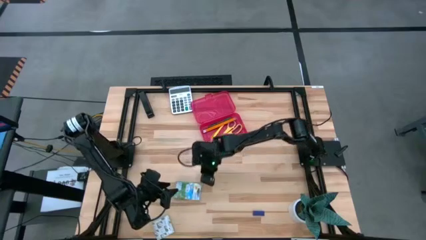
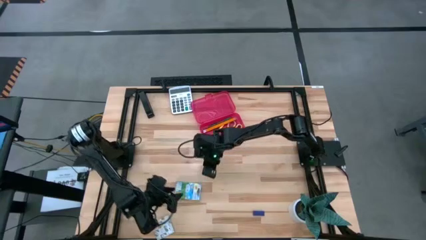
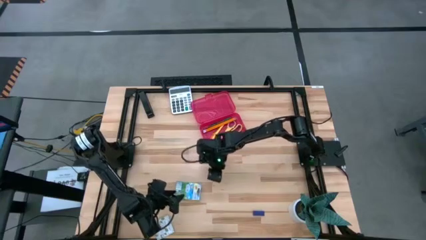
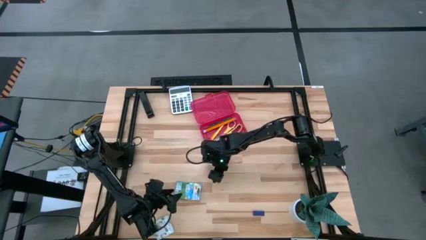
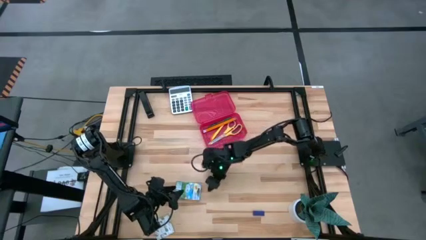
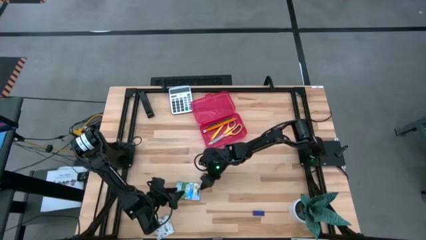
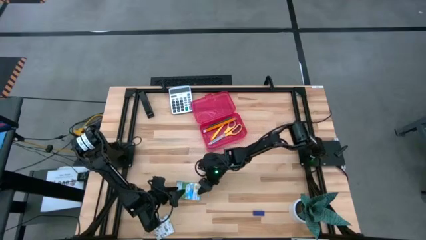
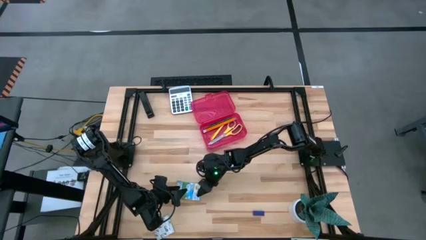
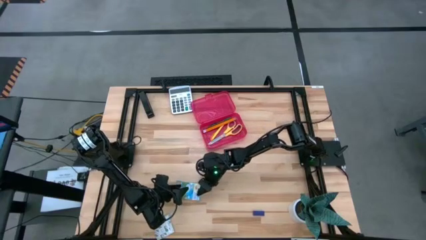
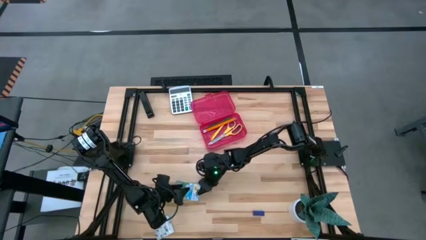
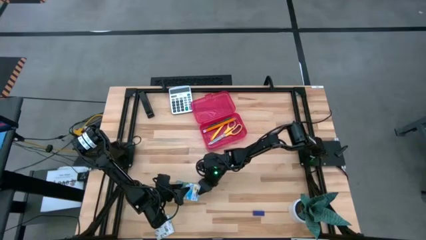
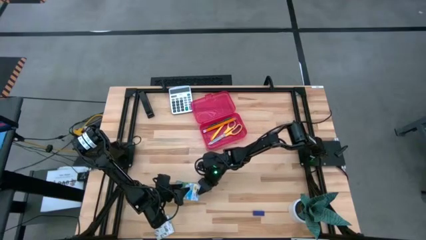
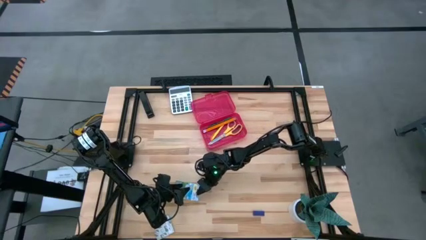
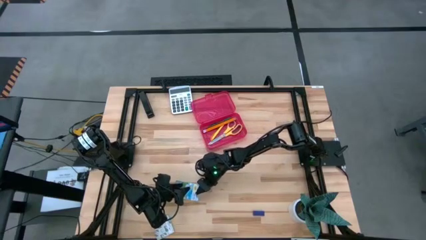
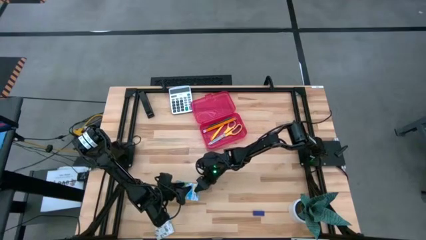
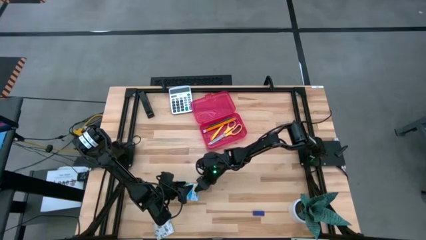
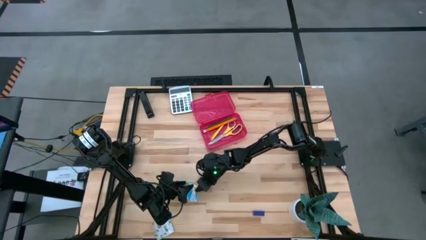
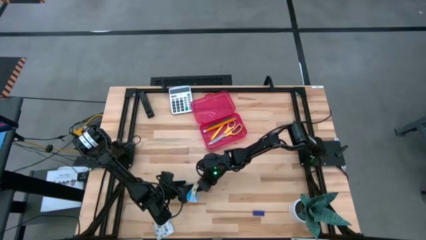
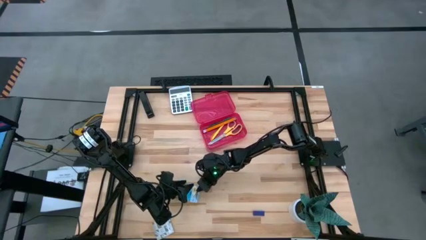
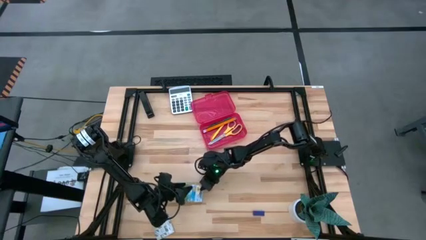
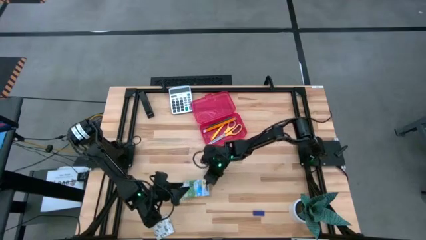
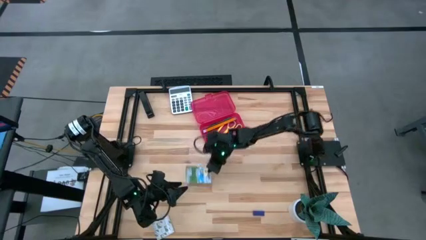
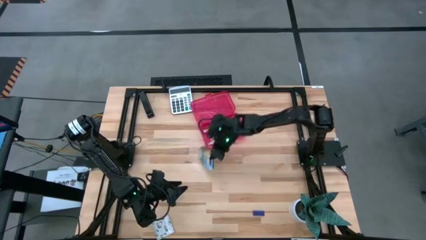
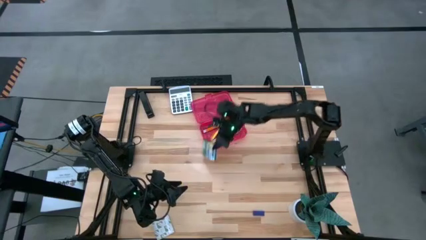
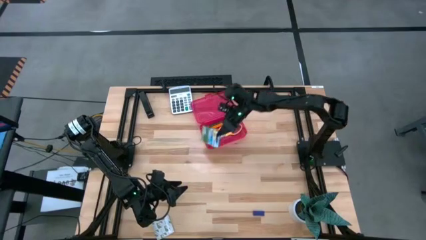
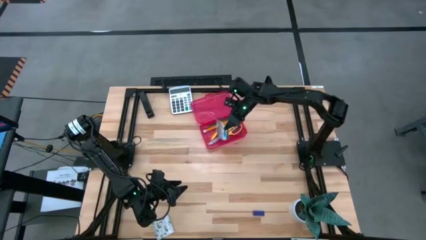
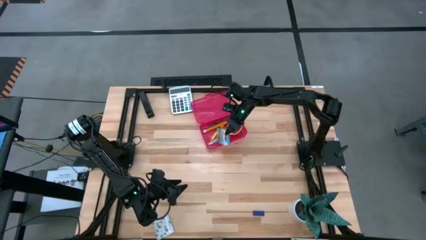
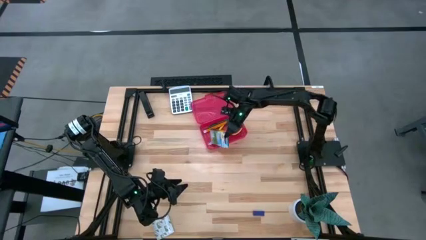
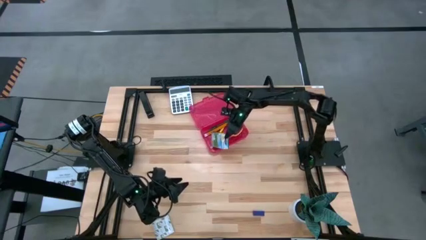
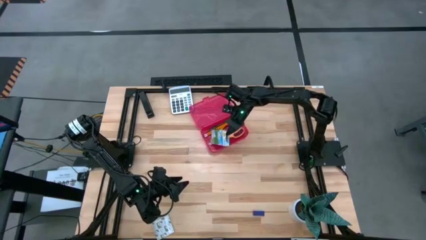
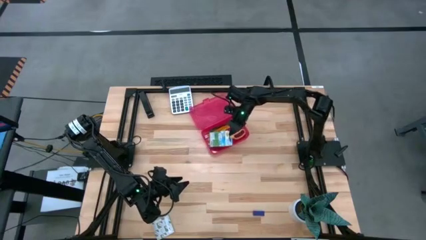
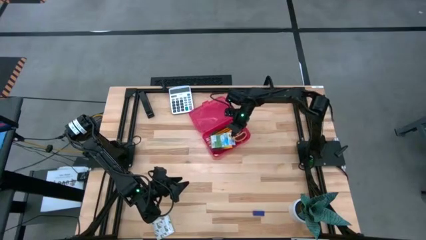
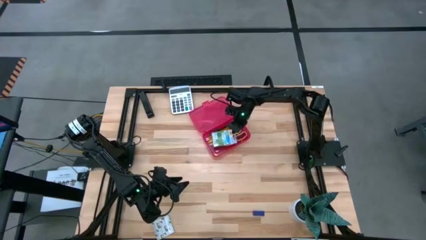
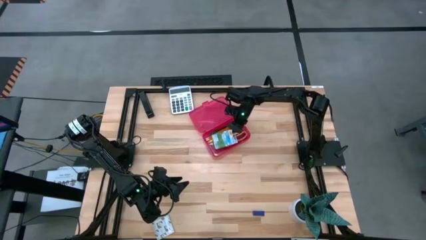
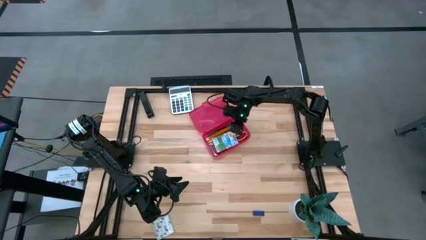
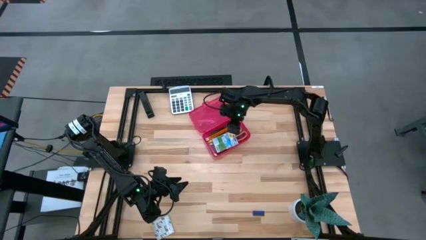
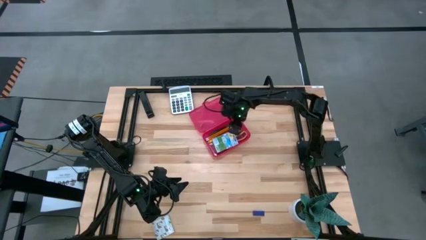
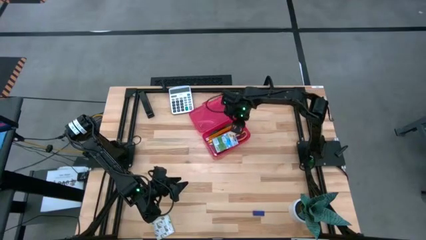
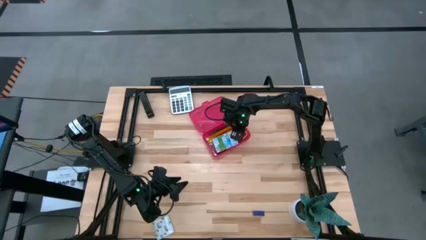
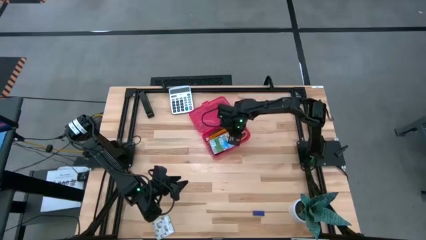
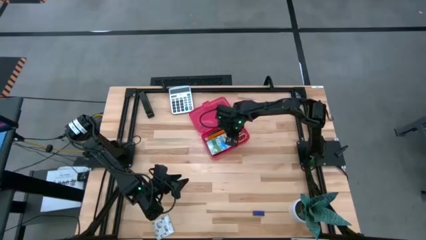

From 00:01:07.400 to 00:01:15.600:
Task: Pack school essentials
Put the orange crayon box into the red supply box

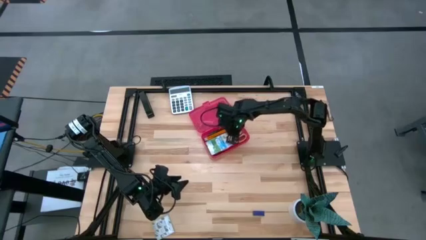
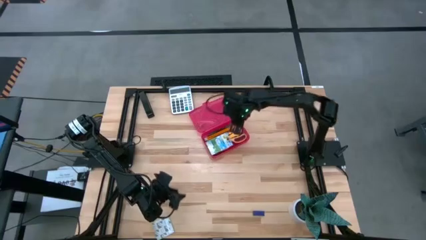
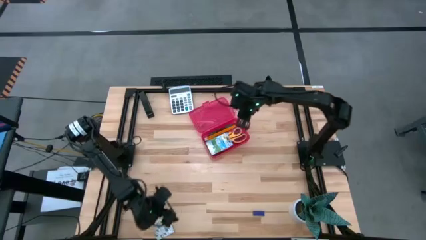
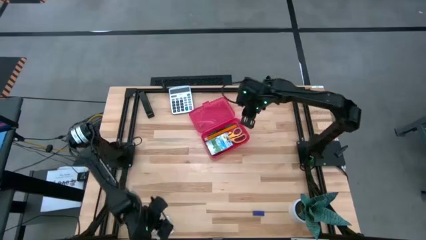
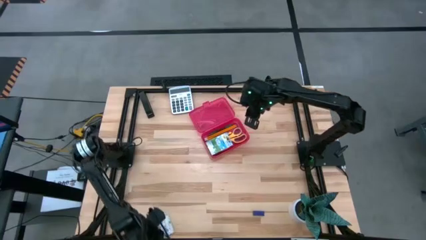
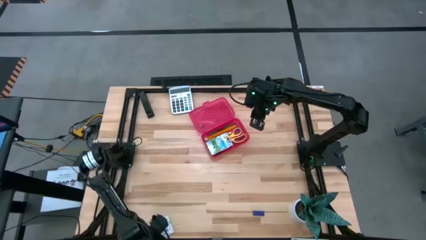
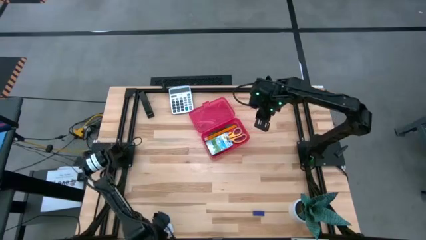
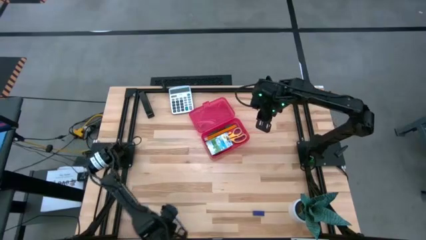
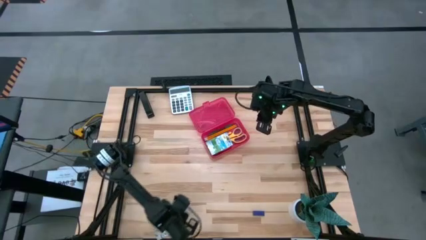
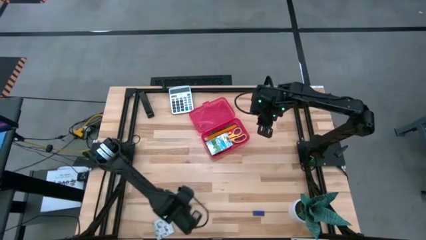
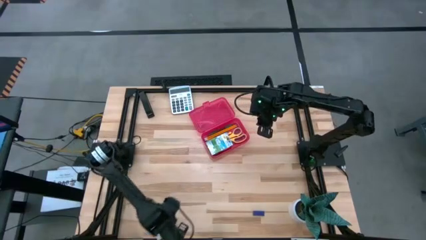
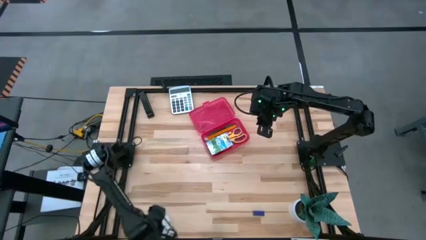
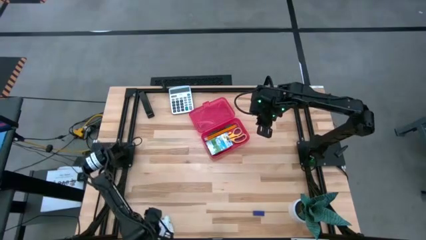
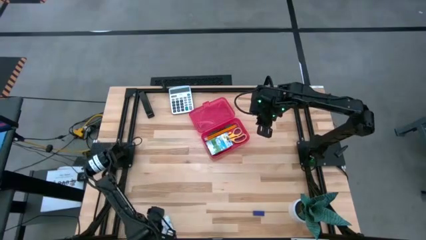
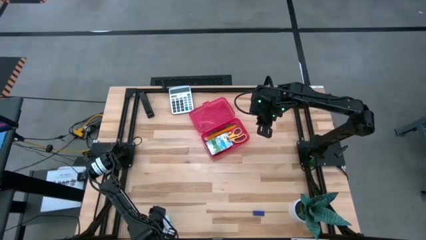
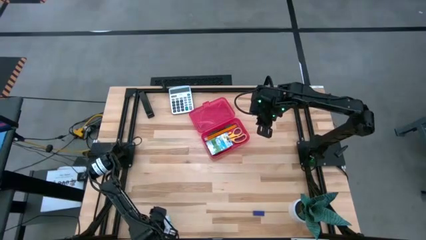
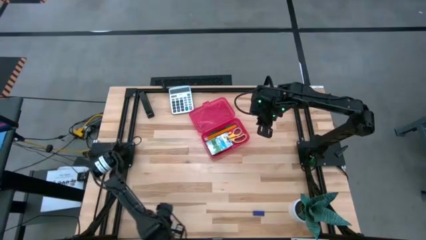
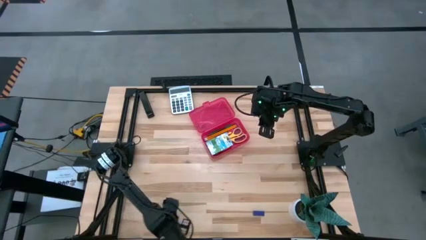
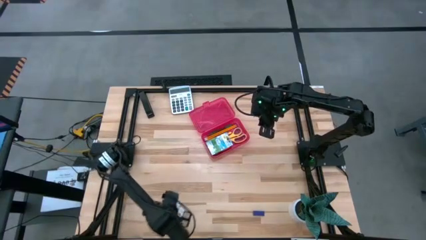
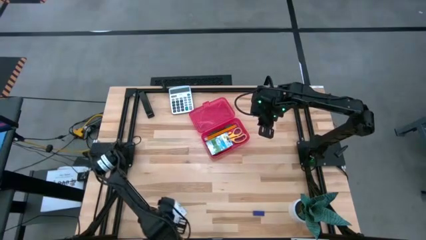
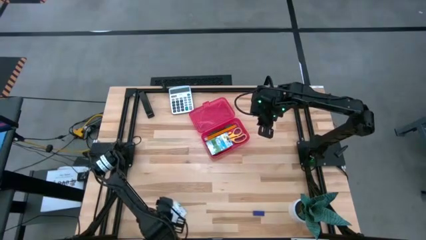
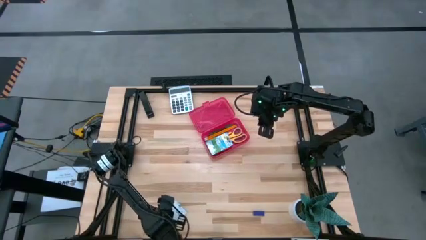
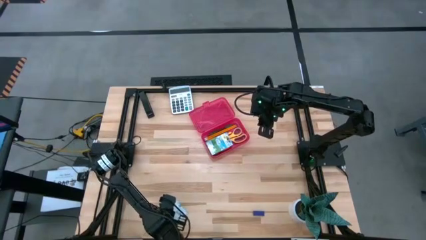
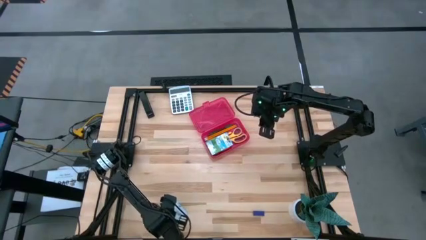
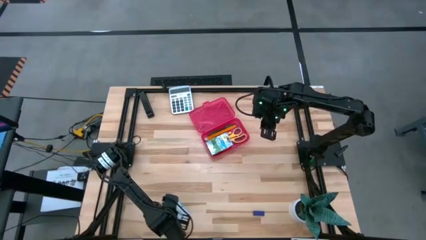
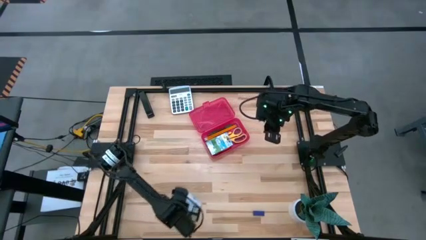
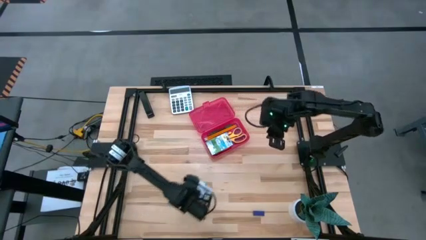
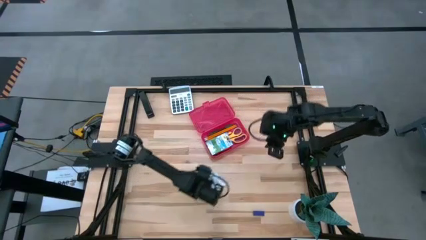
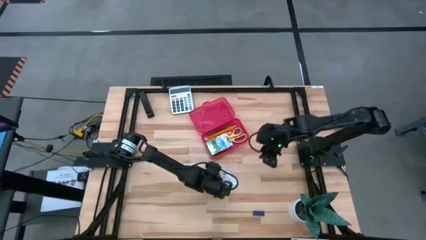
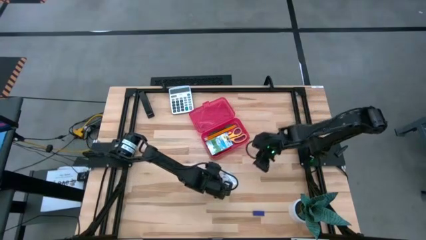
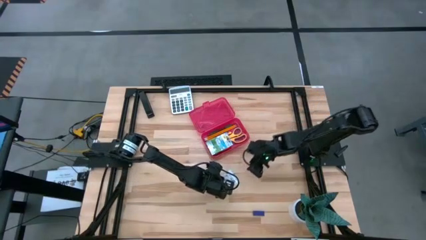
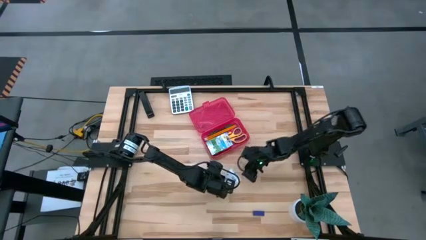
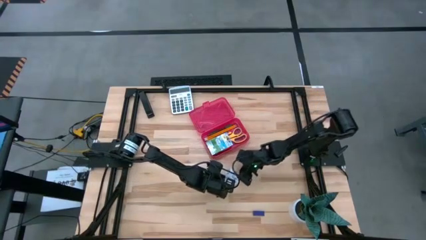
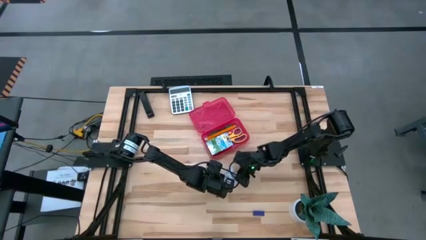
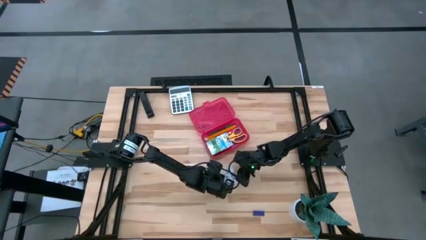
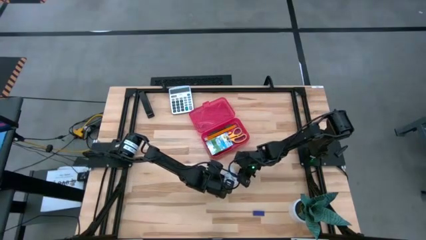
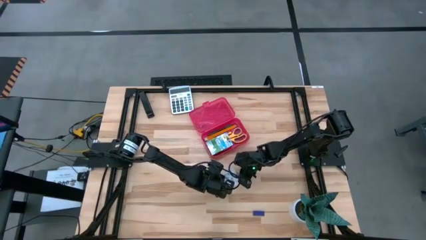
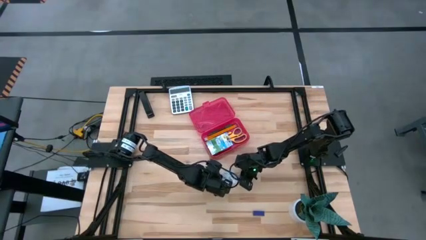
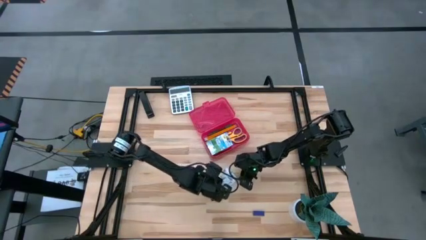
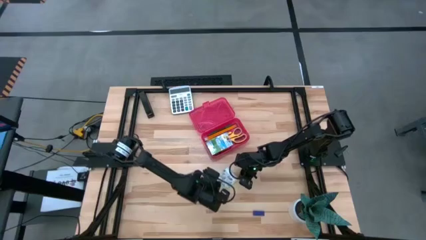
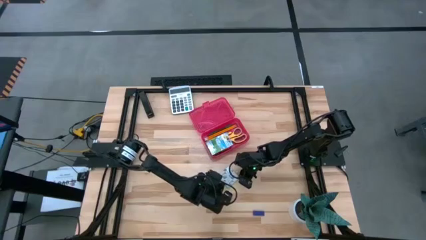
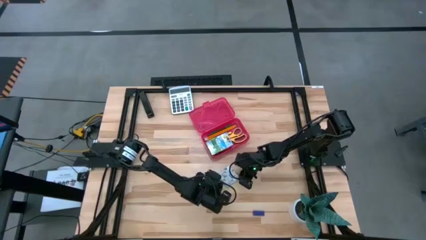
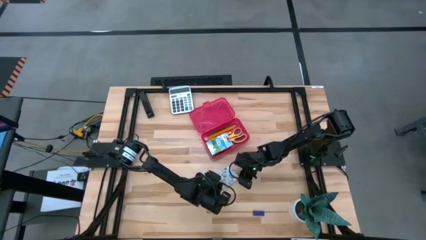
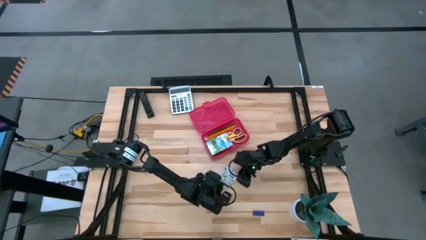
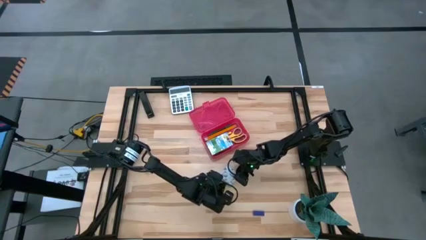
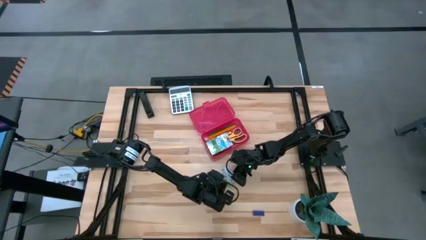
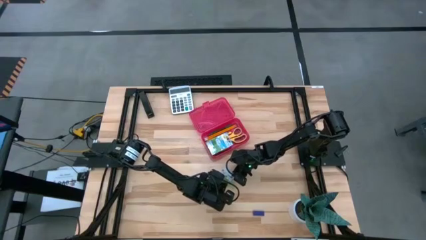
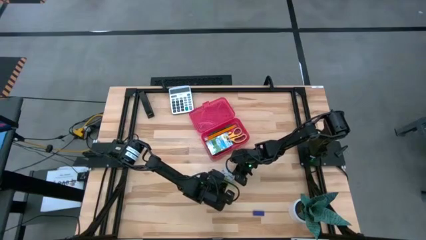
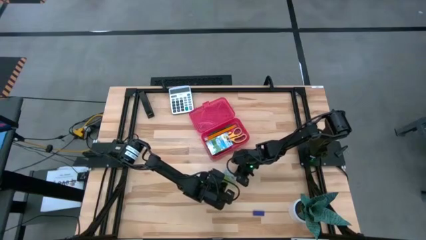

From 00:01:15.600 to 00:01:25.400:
Put the green sticky notes into the red supply box
